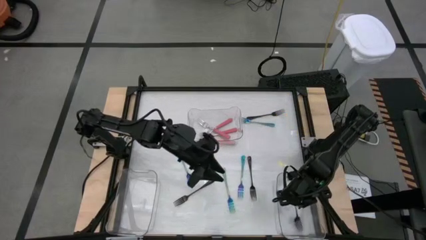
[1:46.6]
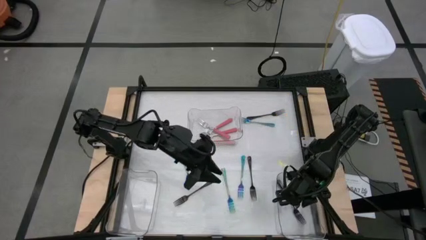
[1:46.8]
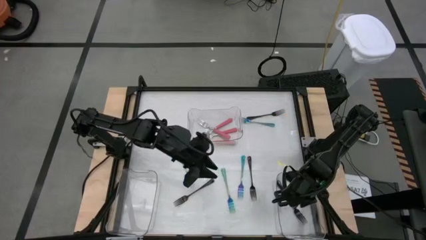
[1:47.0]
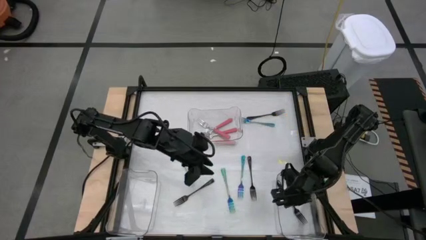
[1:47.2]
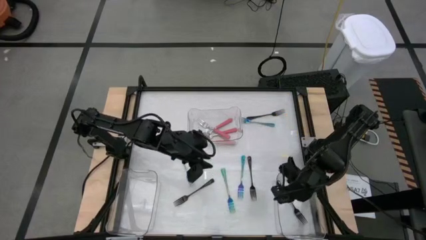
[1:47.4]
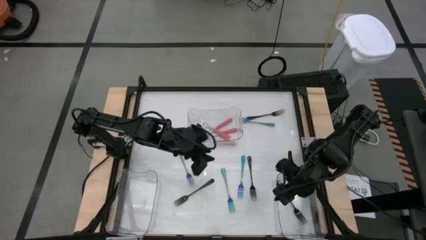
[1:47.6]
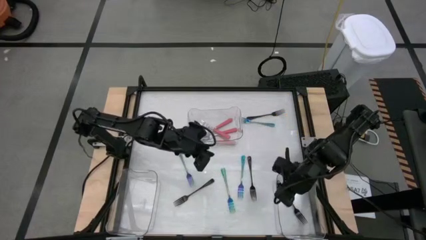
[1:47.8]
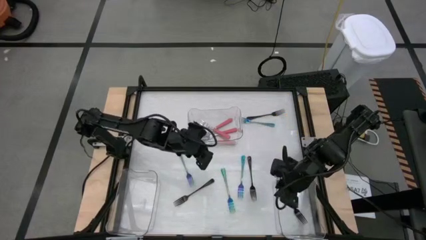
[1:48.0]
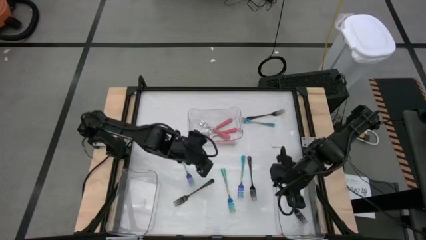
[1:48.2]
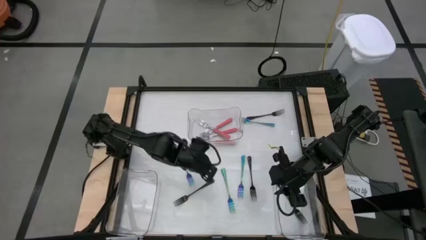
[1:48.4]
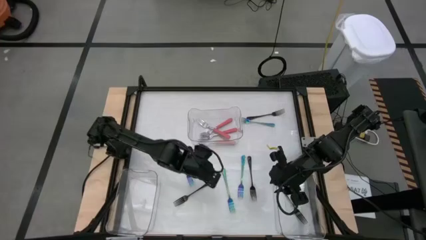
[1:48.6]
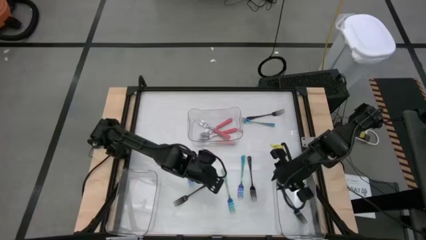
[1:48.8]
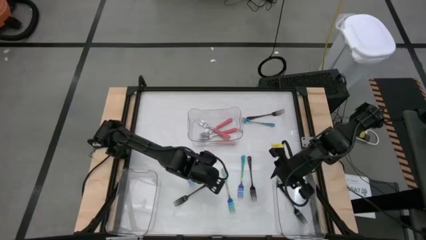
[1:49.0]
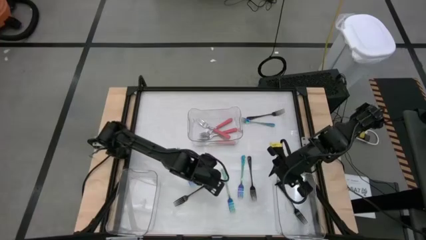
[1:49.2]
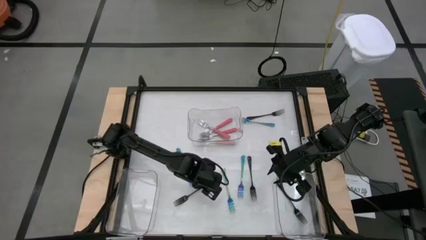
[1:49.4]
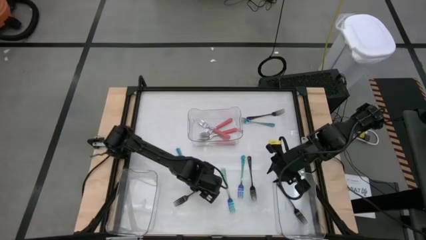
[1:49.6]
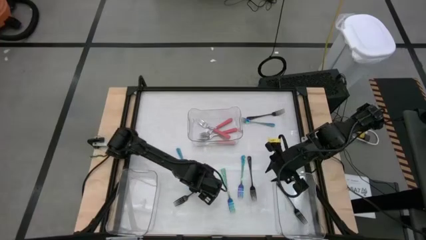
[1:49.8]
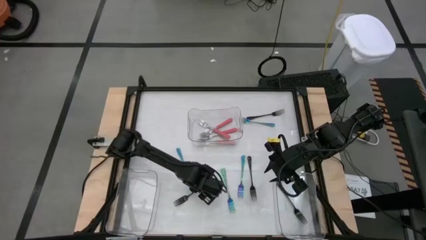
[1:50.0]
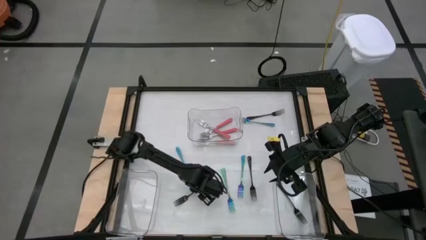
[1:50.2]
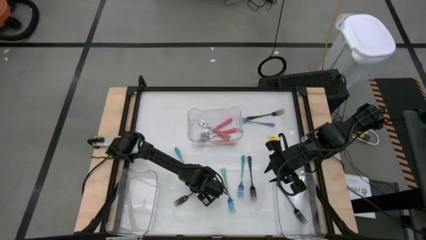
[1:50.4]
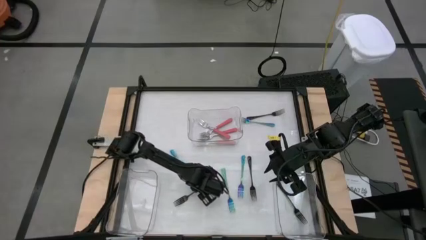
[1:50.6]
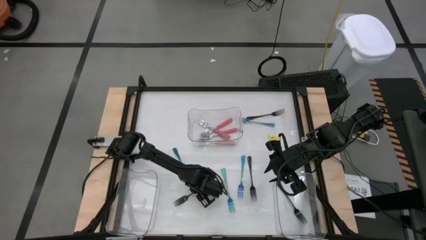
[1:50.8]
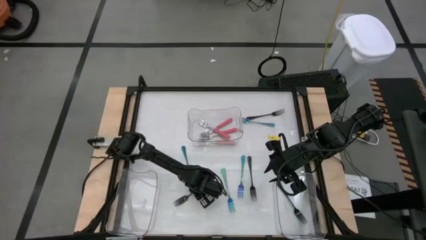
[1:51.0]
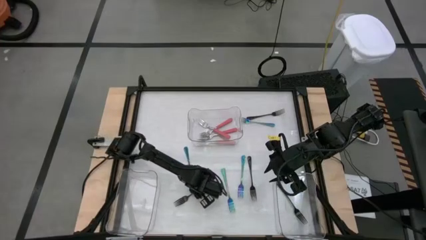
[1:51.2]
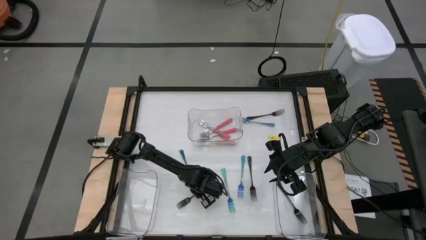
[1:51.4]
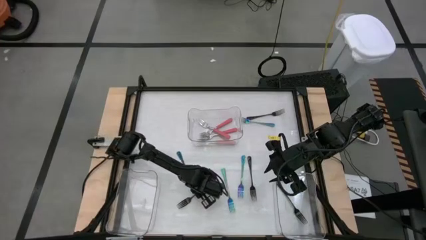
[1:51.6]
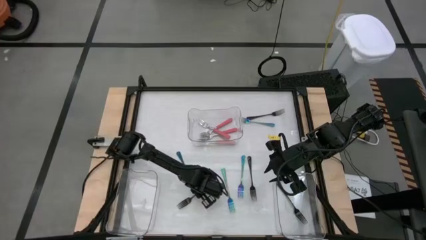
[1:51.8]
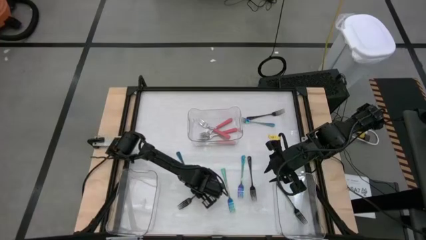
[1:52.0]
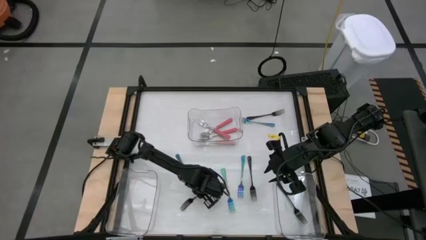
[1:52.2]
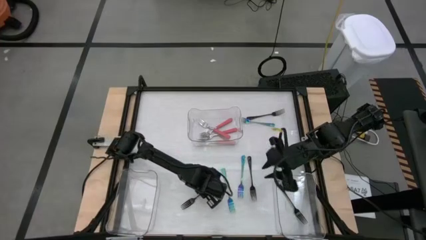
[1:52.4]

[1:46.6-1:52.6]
Task: Sort silverware by color (type)
Put the black fork into the right transparent bin

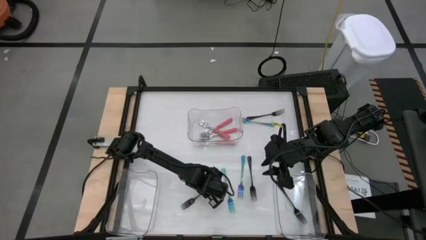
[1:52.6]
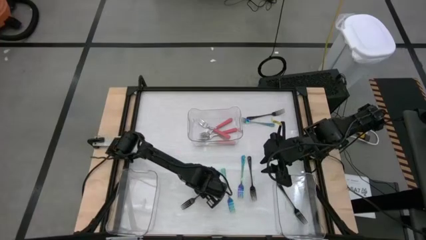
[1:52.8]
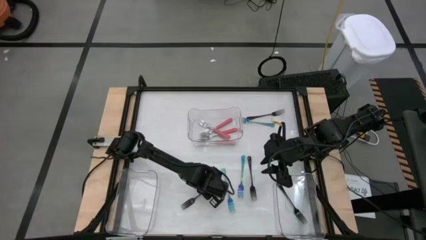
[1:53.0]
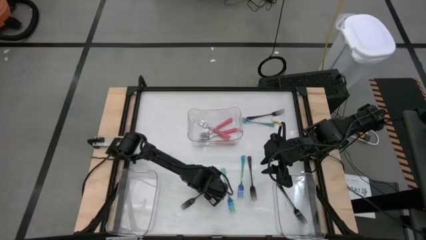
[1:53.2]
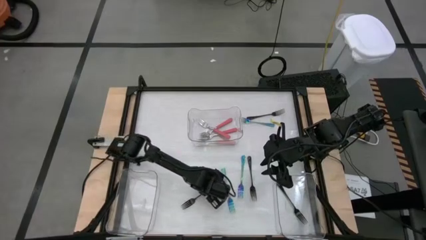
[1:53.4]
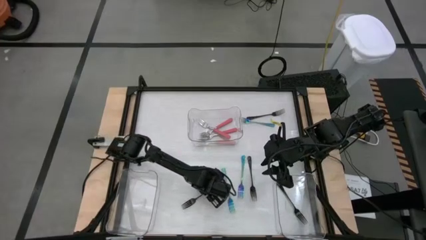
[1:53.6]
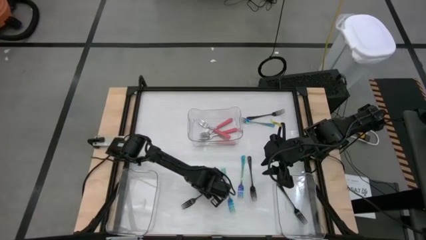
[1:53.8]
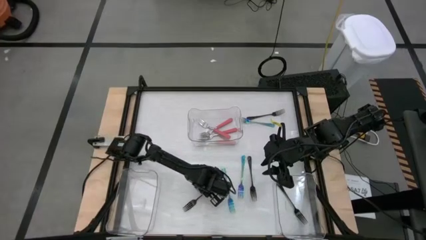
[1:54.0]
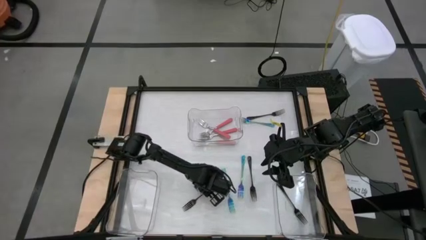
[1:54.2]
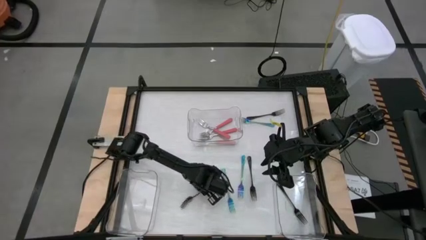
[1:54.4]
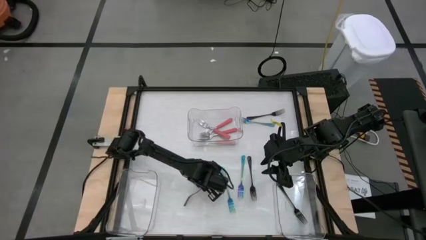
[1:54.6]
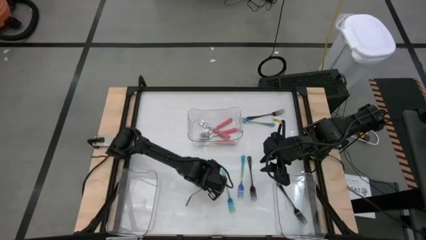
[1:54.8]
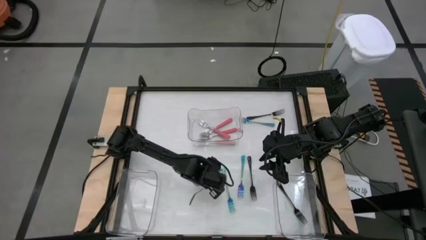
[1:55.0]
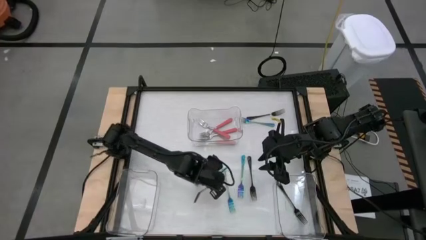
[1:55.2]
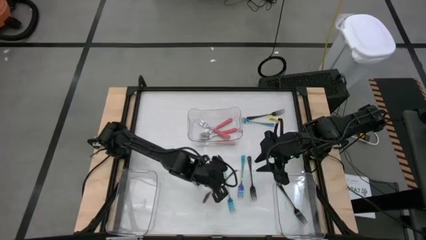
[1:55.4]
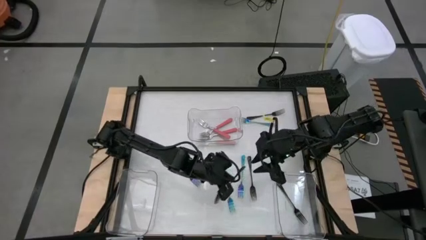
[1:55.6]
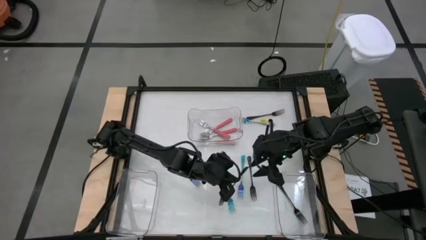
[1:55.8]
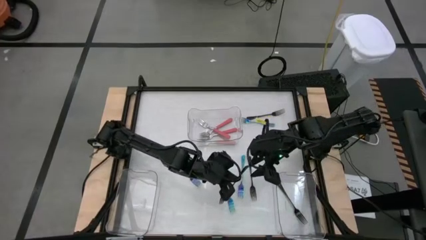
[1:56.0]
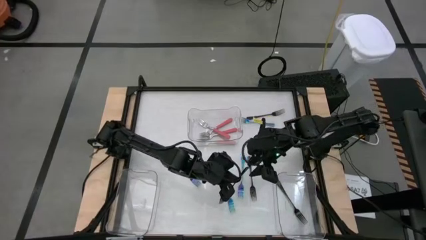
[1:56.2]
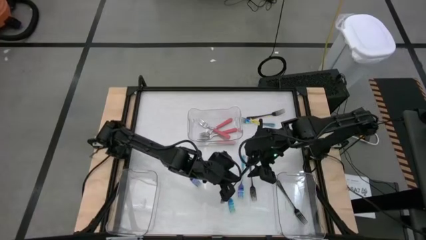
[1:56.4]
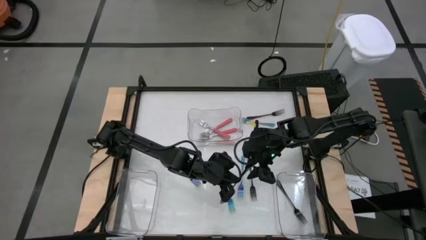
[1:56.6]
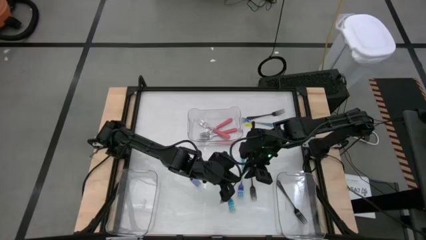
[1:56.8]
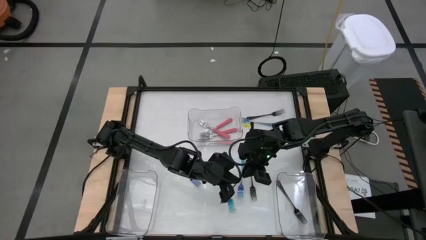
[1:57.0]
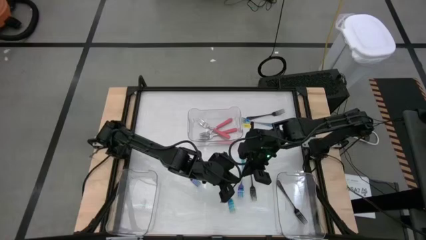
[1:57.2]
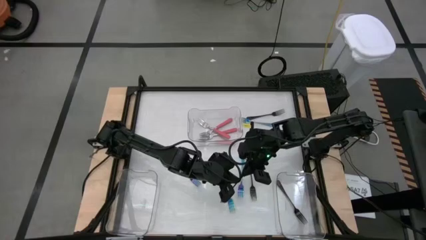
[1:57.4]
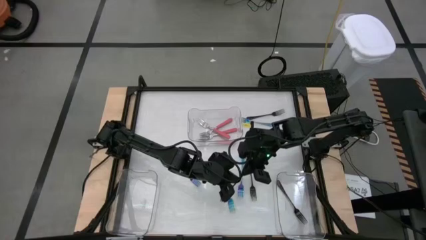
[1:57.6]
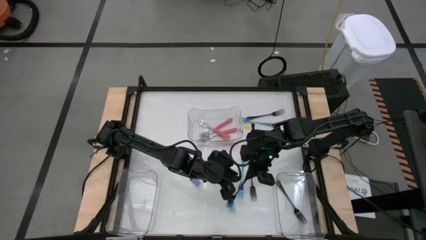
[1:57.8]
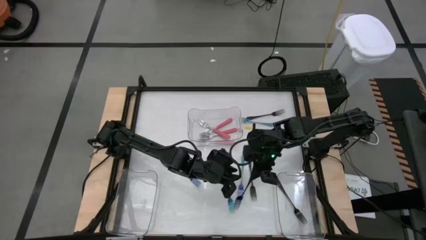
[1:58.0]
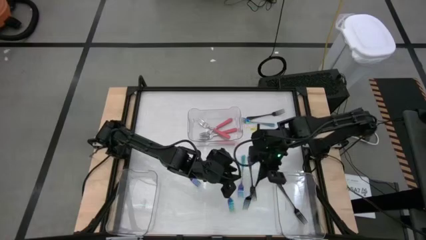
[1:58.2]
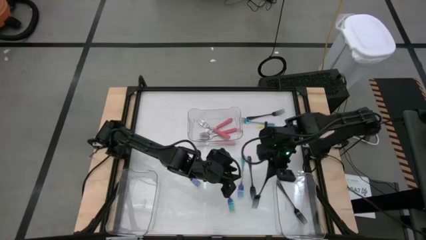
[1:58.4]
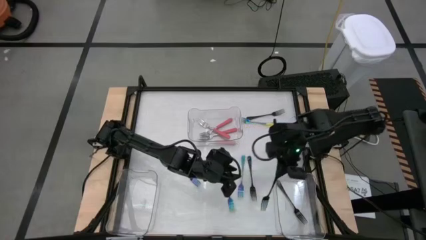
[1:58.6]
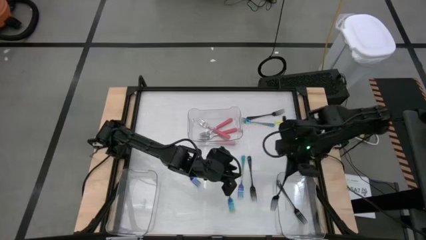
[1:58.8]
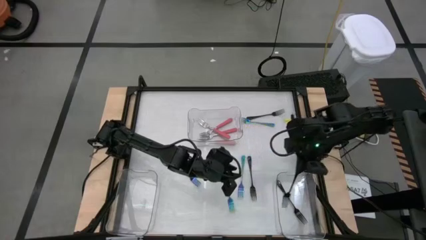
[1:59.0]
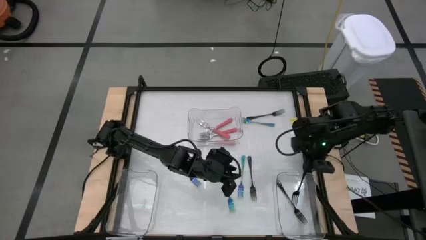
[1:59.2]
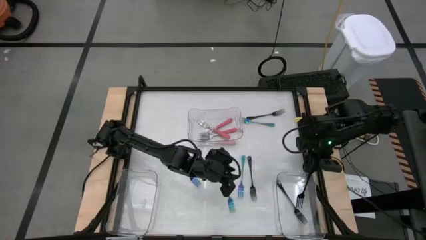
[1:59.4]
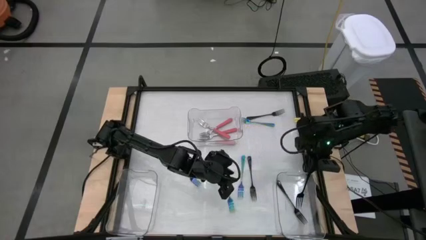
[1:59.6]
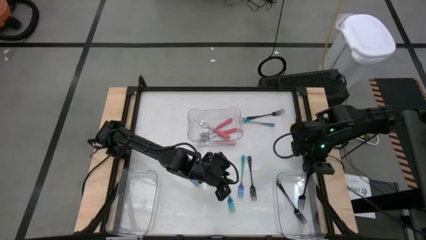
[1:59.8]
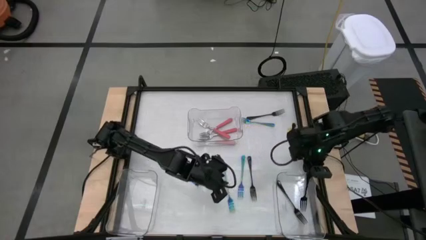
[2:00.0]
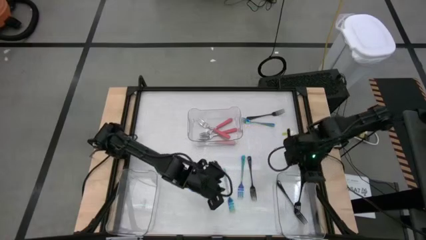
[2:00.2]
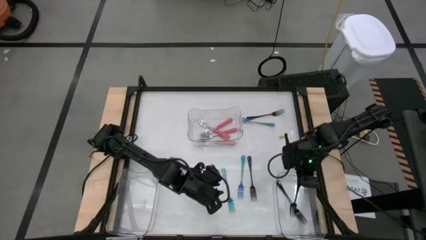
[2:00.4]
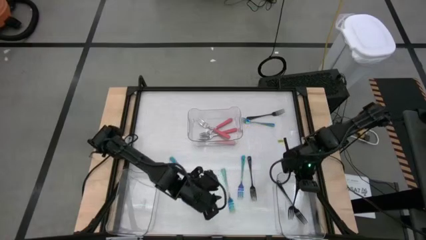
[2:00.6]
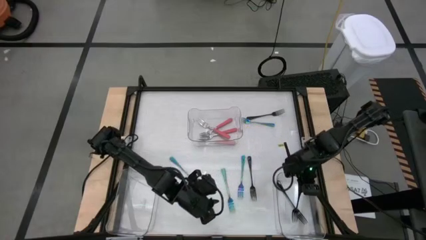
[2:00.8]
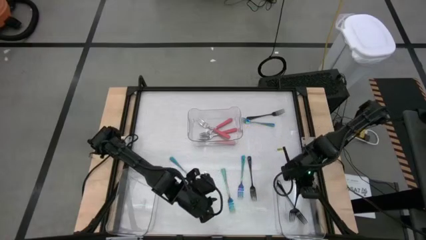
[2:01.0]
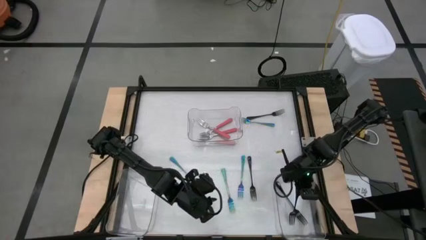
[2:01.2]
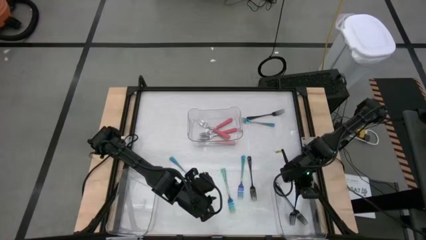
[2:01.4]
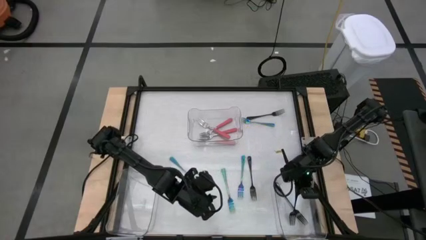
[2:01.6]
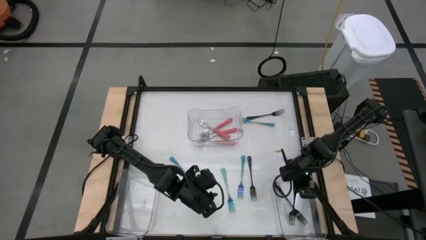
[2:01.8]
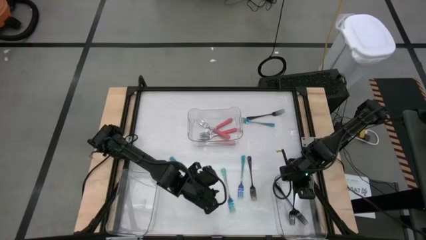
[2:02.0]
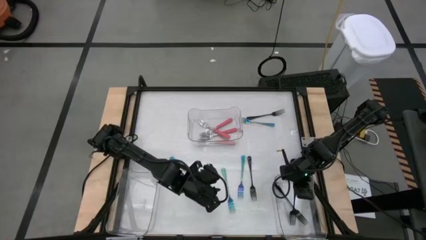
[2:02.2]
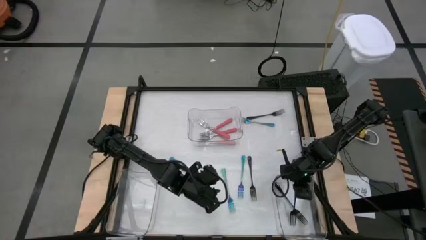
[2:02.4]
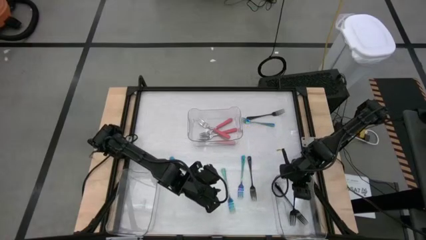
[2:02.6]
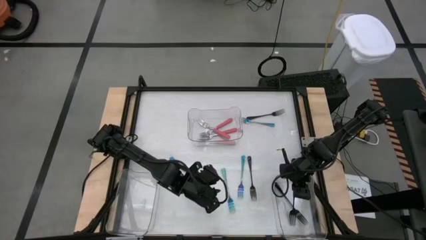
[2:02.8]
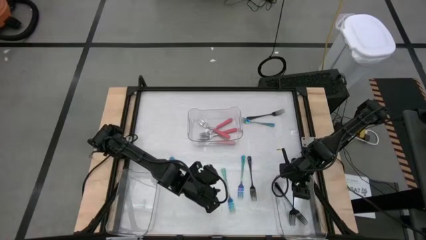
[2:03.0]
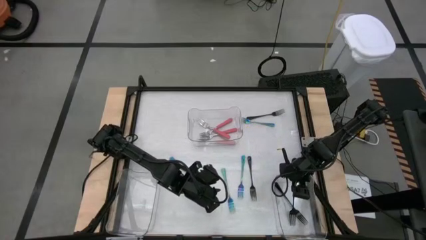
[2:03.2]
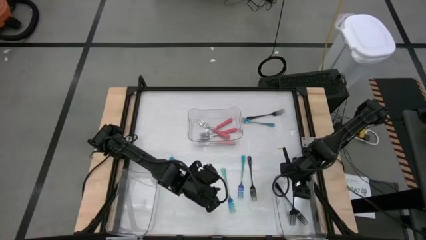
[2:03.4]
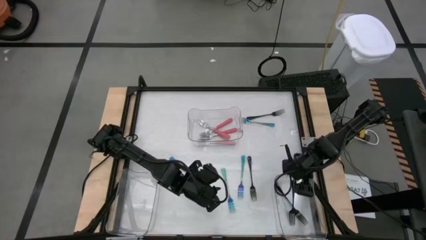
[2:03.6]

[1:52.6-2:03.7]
Put the black fork into the right transparent bin
